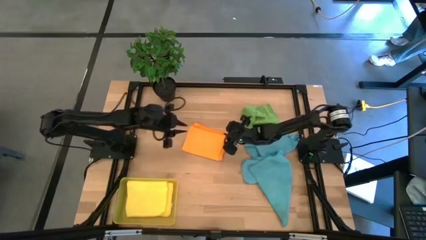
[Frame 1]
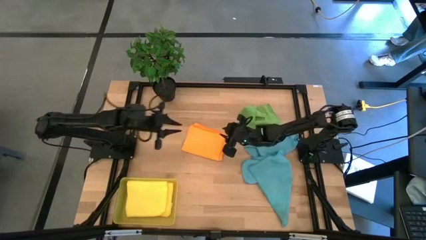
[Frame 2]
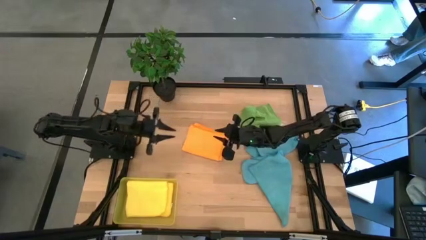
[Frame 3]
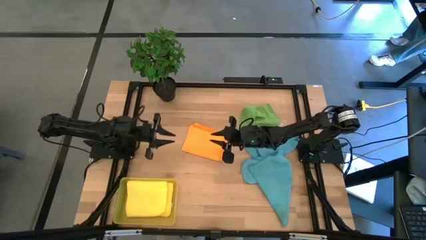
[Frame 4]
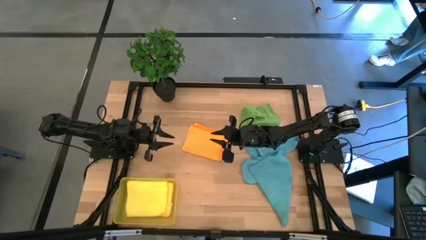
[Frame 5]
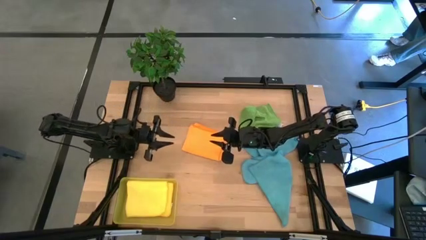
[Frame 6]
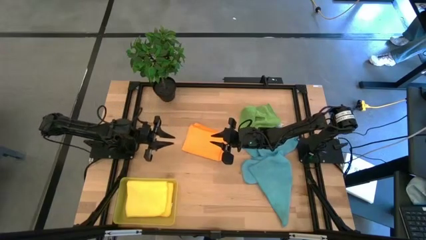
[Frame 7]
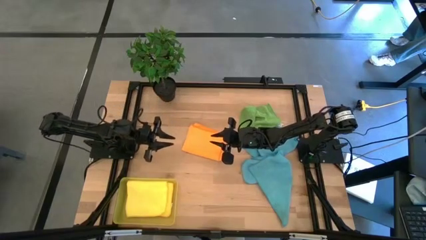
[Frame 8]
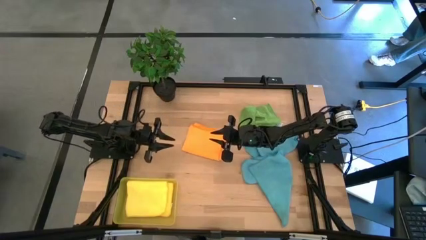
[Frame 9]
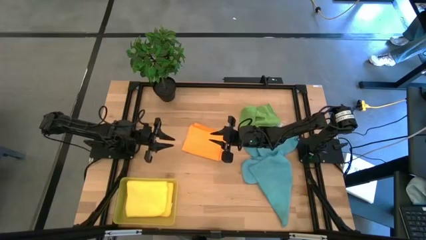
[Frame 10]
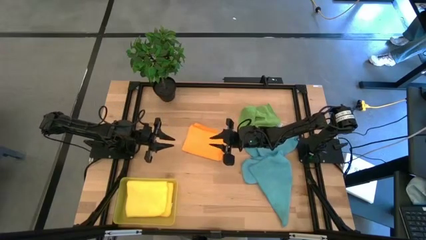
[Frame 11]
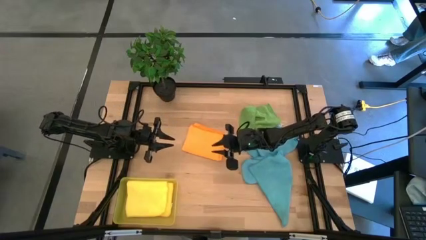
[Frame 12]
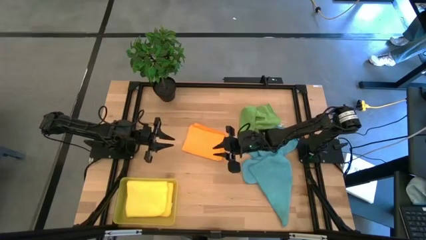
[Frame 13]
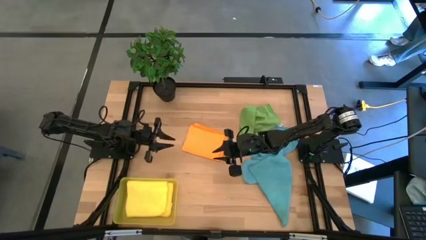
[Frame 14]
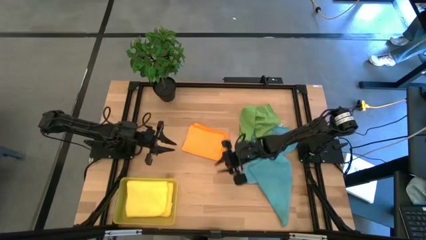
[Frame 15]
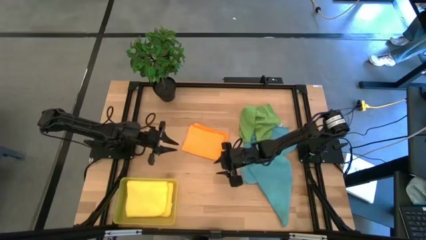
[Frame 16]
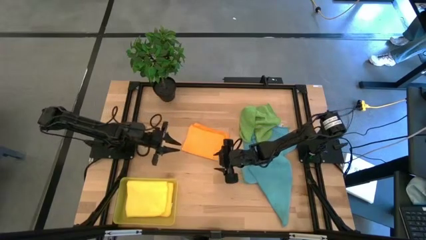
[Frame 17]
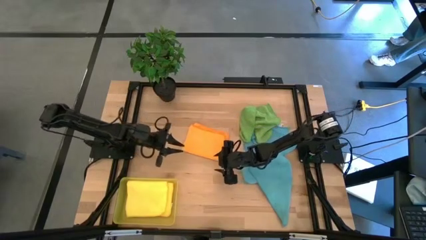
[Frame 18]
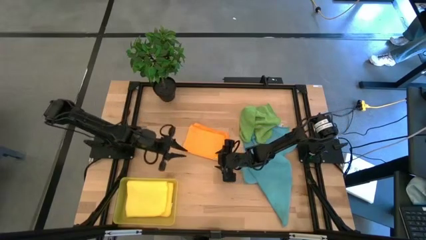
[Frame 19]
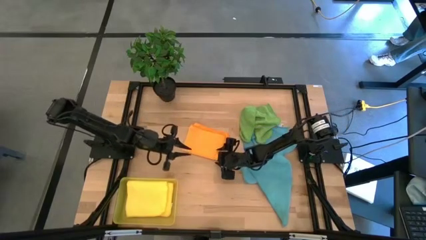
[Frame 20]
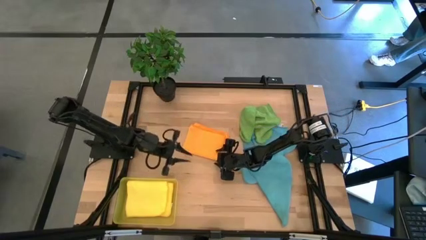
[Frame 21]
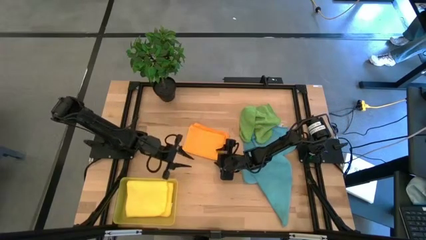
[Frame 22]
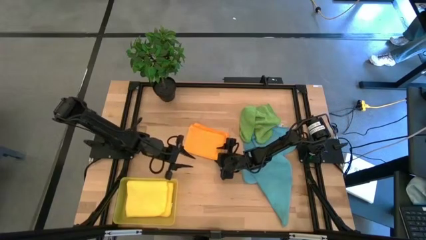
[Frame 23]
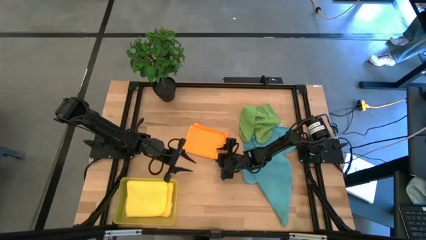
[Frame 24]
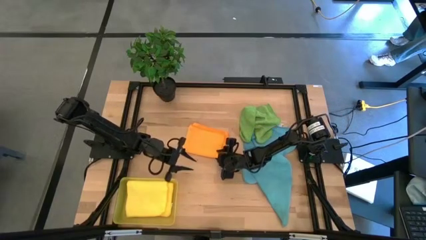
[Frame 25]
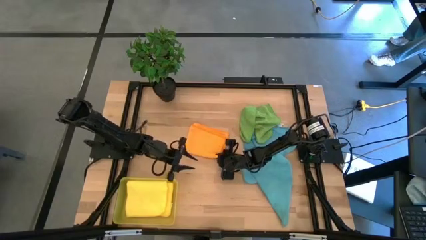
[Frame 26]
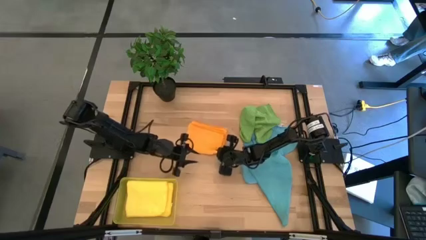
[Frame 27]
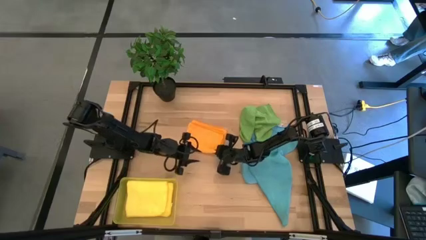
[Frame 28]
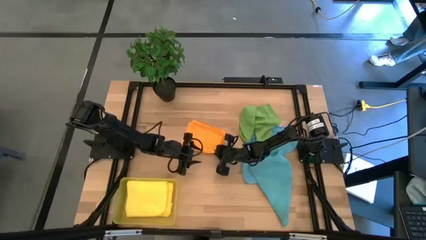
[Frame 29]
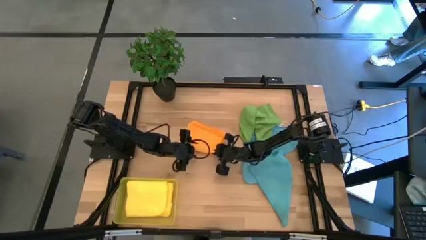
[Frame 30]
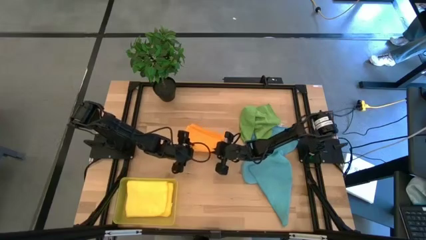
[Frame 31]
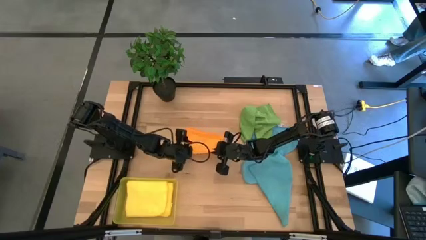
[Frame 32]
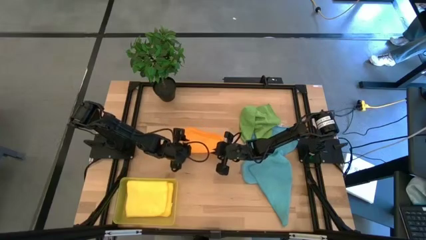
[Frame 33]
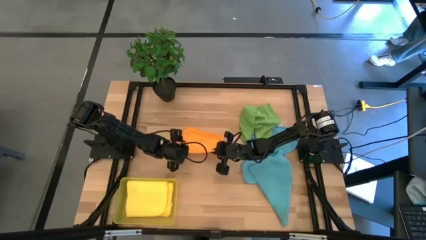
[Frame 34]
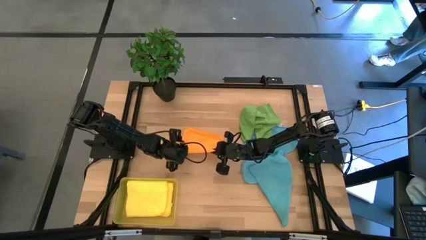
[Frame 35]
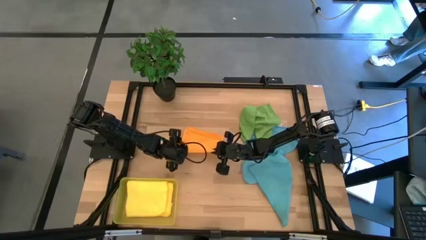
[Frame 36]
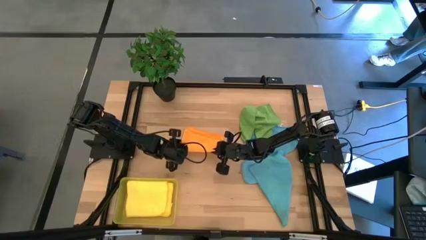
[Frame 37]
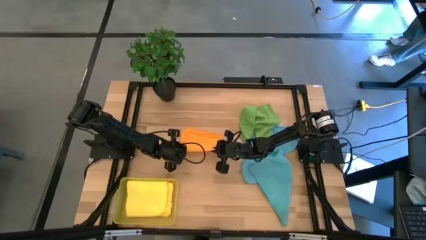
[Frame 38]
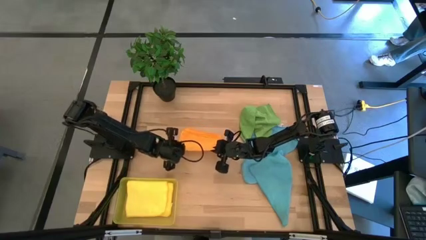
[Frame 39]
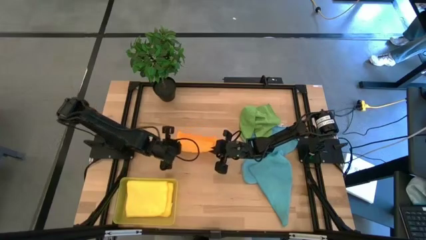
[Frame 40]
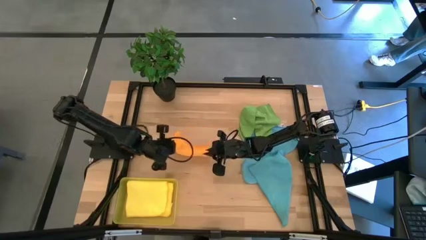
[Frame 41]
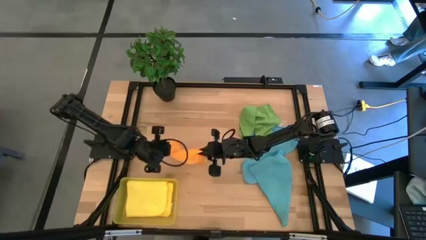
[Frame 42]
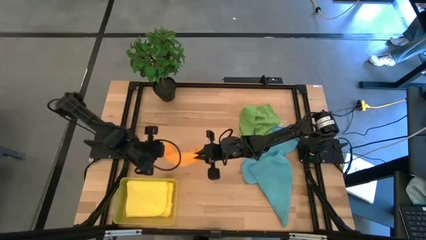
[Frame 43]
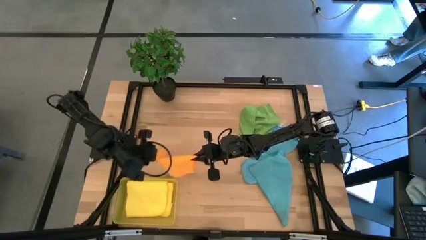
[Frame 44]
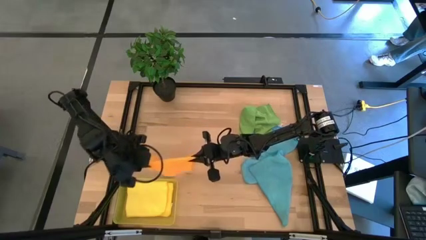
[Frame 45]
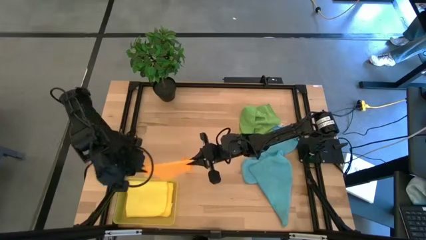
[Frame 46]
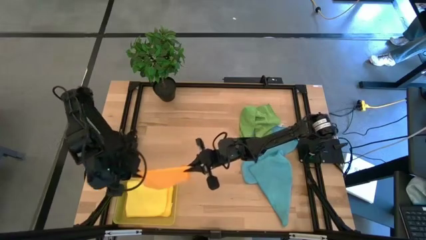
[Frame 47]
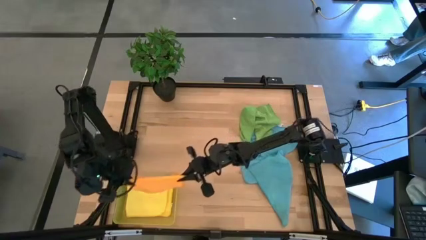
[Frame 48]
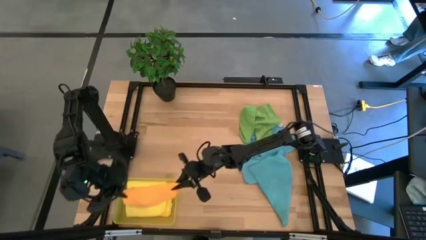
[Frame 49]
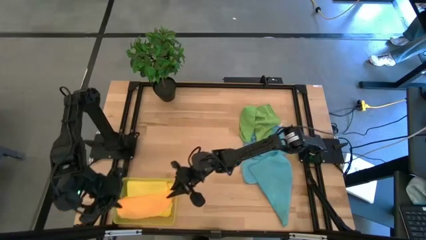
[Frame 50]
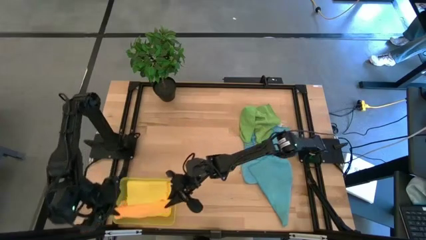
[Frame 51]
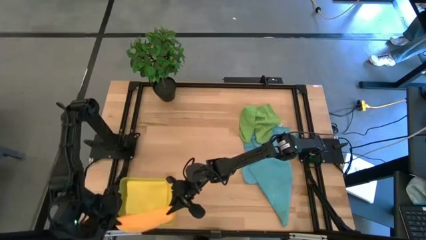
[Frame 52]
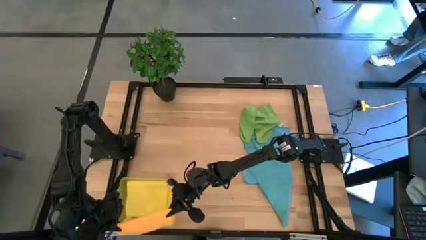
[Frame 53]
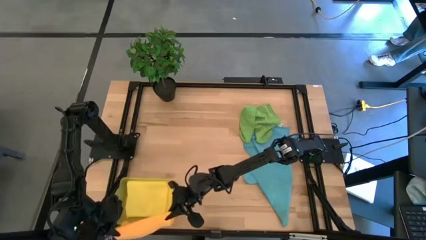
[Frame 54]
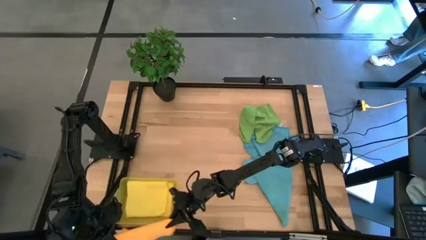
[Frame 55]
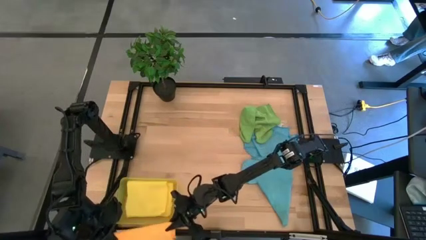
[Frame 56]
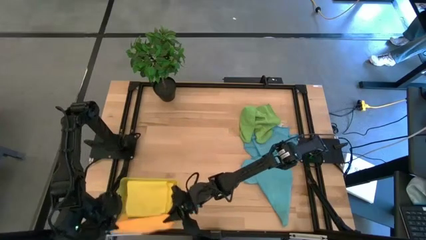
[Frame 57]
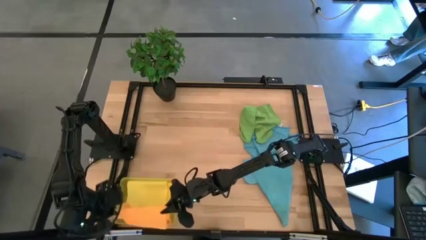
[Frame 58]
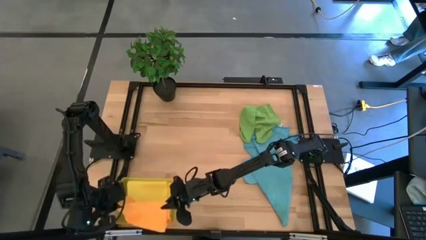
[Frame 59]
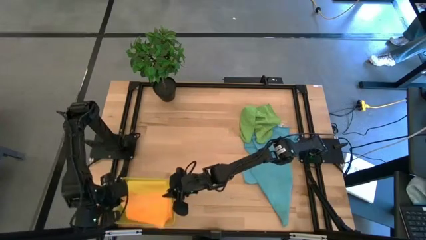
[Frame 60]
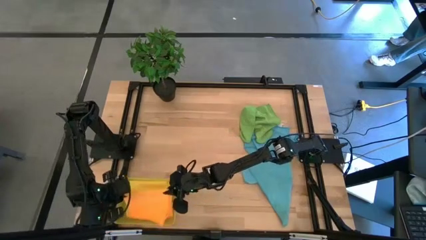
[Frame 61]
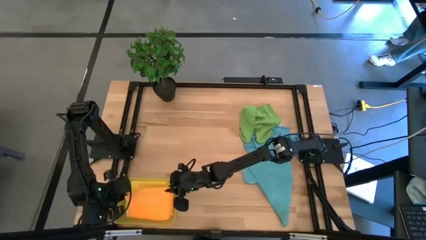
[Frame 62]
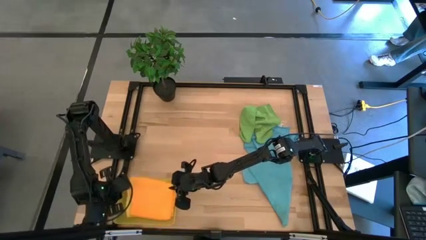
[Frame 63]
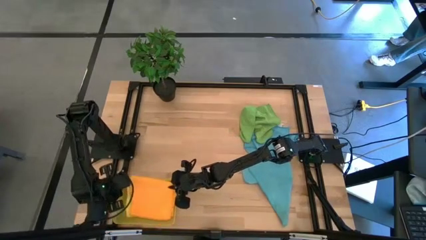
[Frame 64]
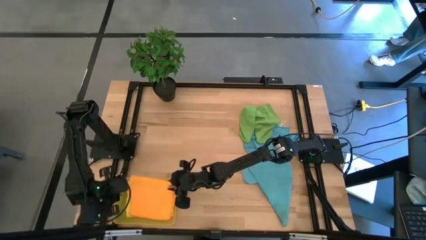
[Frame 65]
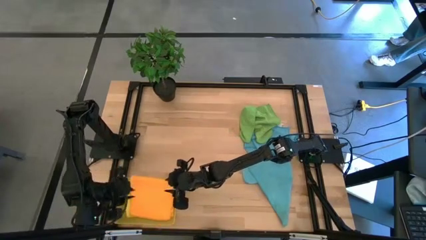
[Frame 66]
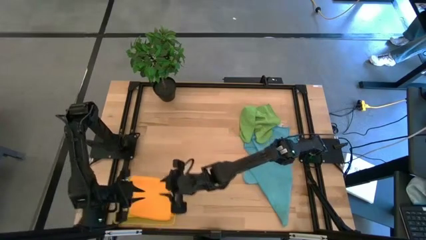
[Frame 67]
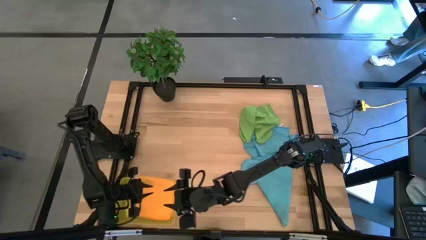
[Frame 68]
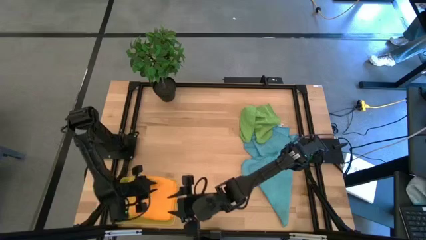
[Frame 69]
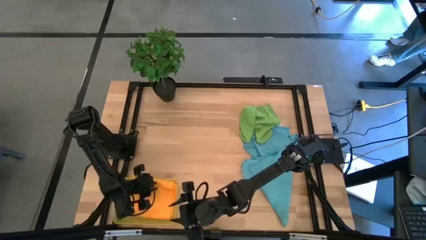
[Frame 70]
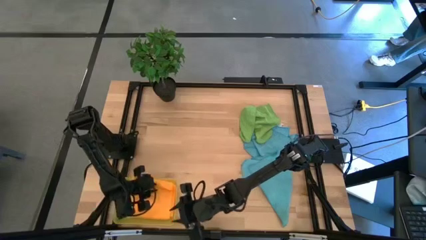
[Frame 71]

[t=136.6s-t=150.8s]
Task: Fold microfiber towels
Put the folded orange microfiber cloth into the yellow bin
